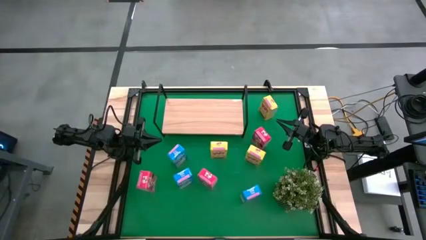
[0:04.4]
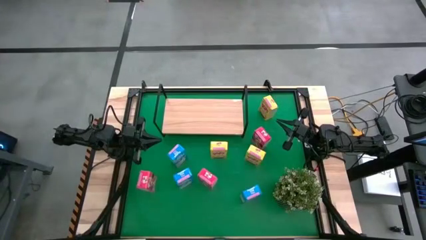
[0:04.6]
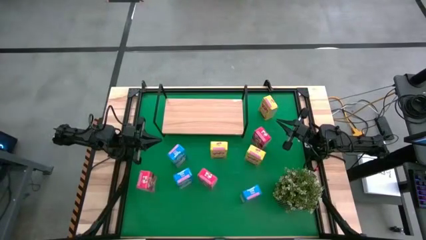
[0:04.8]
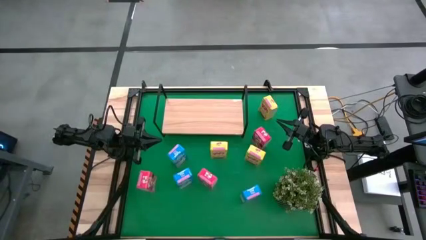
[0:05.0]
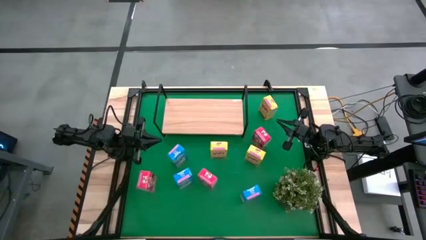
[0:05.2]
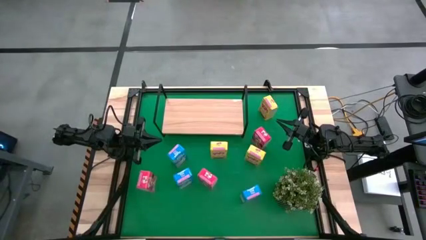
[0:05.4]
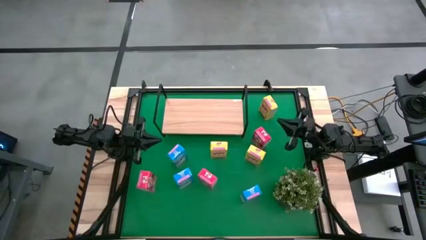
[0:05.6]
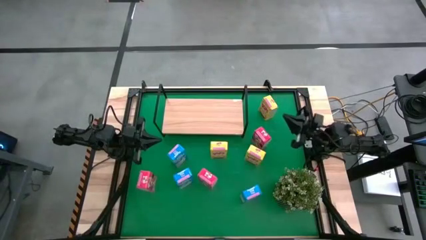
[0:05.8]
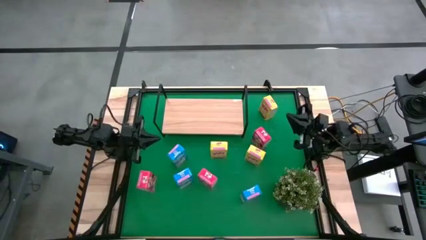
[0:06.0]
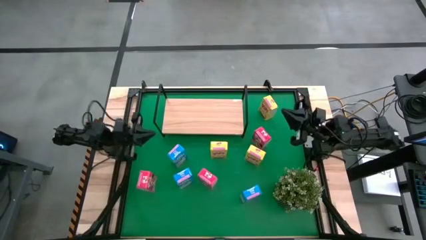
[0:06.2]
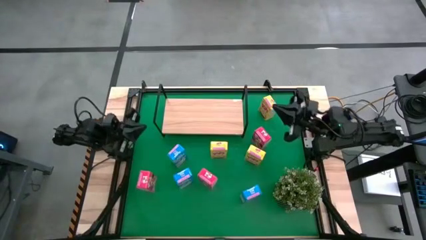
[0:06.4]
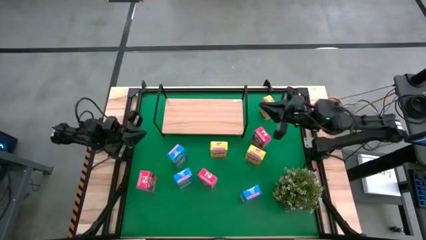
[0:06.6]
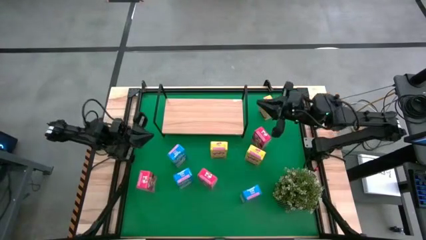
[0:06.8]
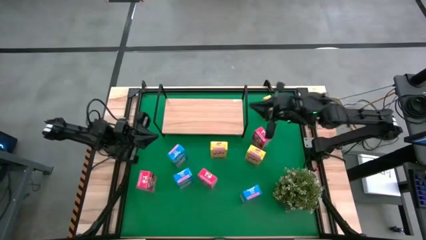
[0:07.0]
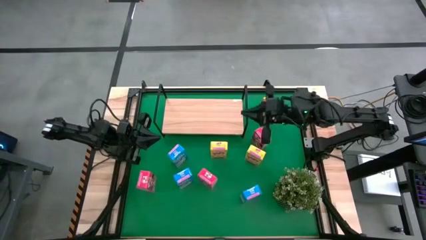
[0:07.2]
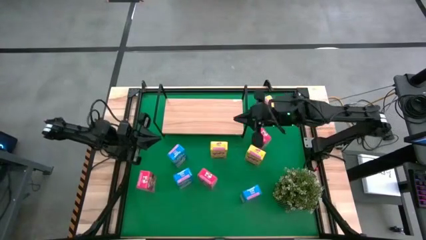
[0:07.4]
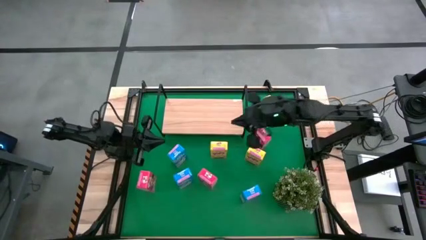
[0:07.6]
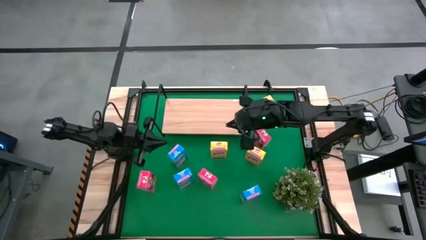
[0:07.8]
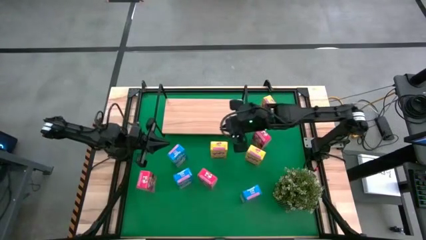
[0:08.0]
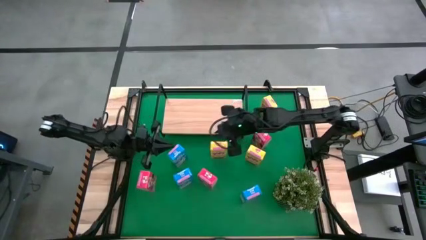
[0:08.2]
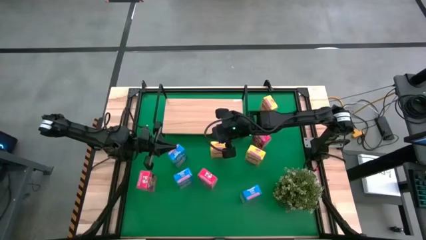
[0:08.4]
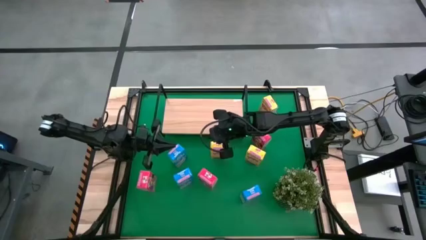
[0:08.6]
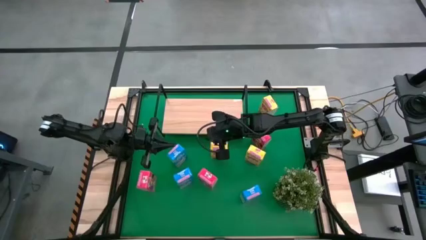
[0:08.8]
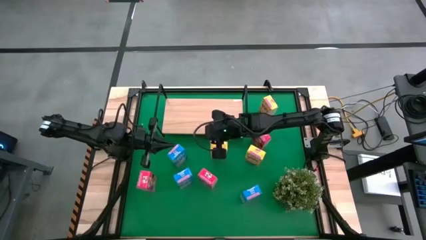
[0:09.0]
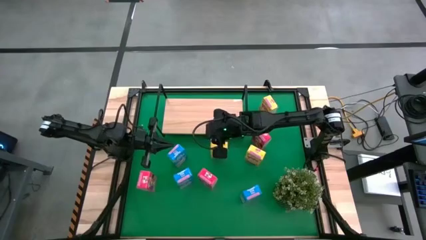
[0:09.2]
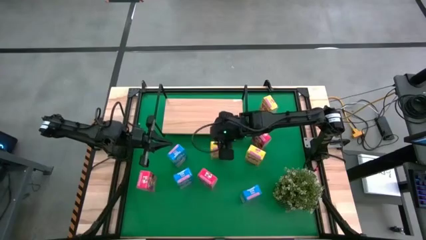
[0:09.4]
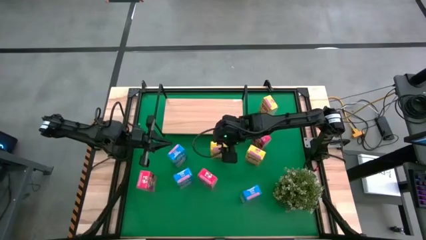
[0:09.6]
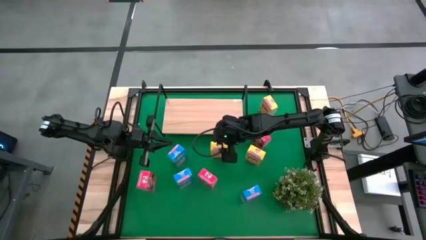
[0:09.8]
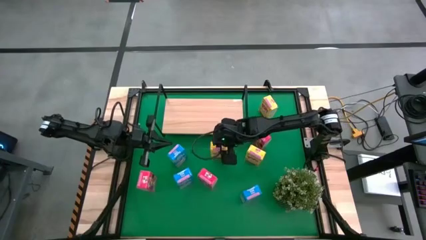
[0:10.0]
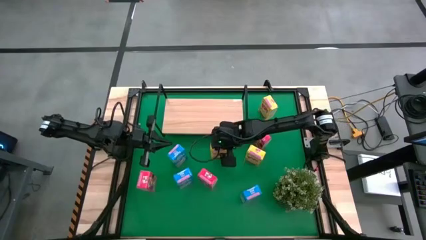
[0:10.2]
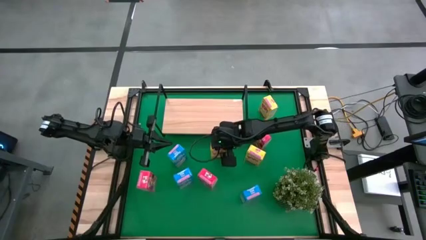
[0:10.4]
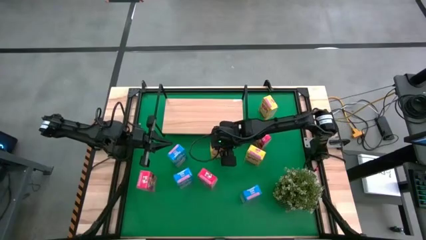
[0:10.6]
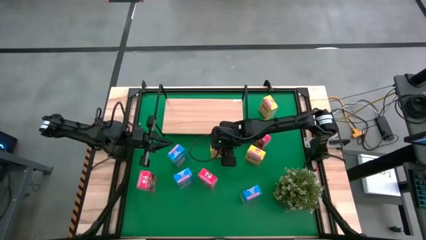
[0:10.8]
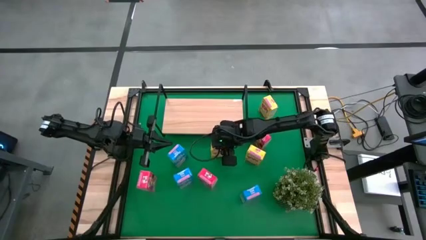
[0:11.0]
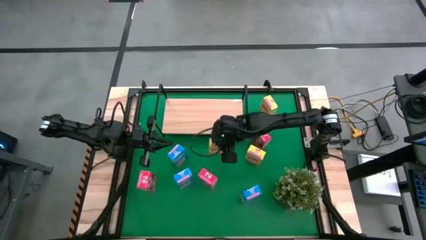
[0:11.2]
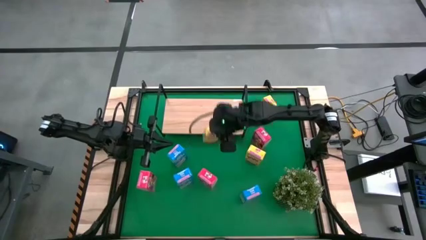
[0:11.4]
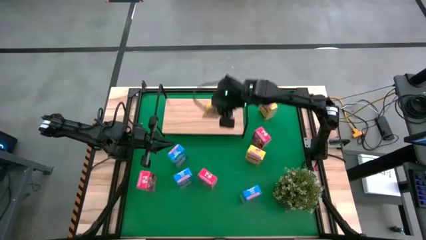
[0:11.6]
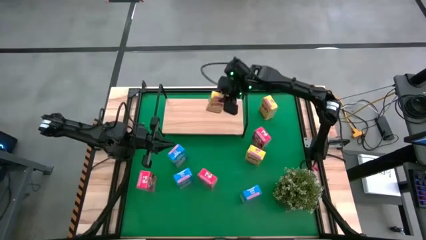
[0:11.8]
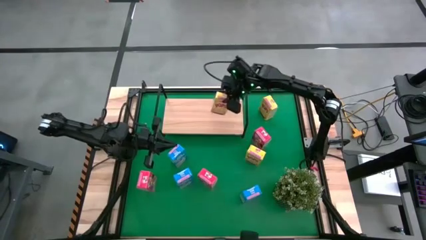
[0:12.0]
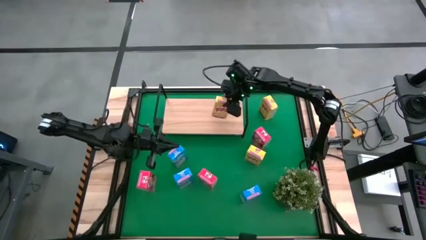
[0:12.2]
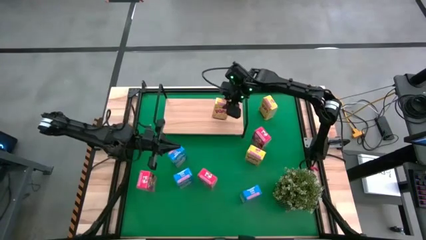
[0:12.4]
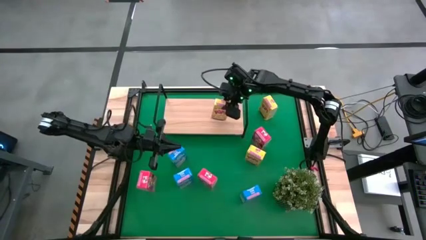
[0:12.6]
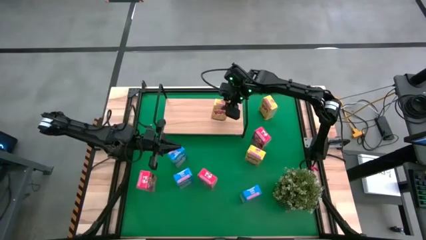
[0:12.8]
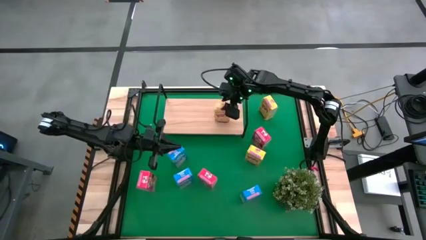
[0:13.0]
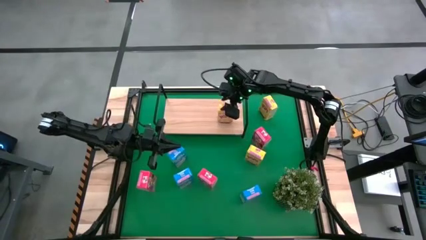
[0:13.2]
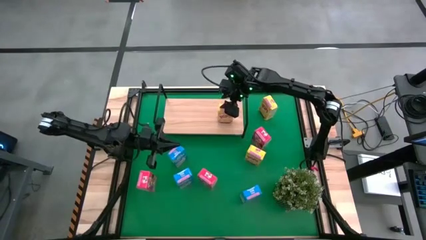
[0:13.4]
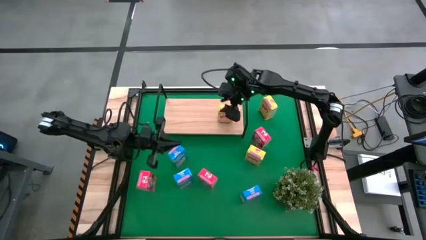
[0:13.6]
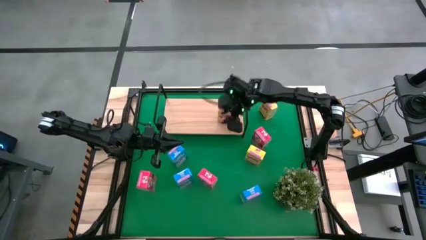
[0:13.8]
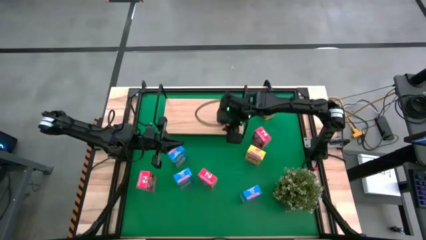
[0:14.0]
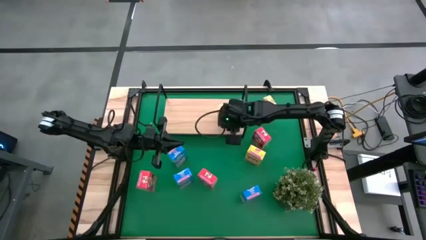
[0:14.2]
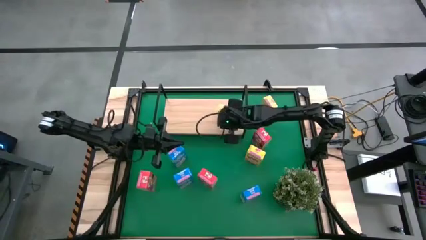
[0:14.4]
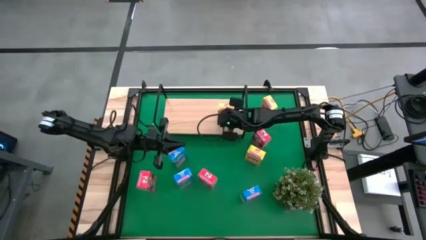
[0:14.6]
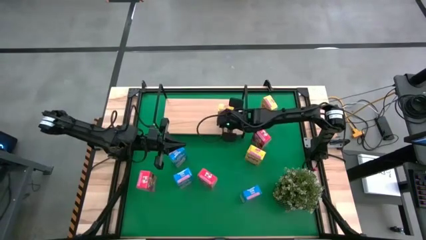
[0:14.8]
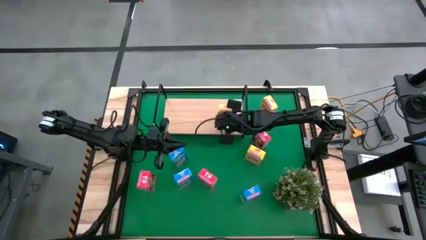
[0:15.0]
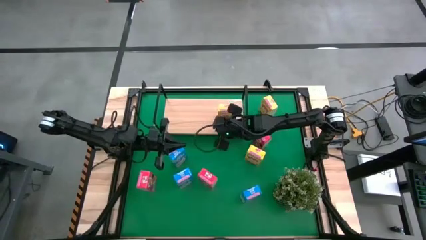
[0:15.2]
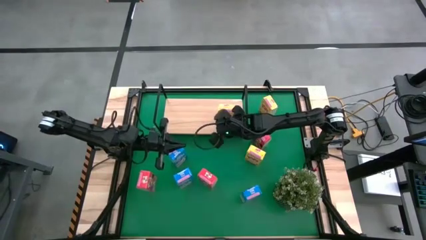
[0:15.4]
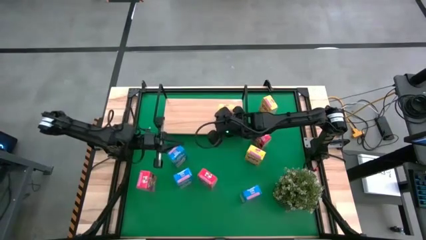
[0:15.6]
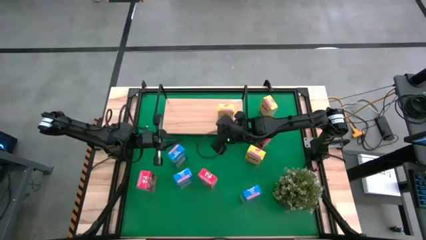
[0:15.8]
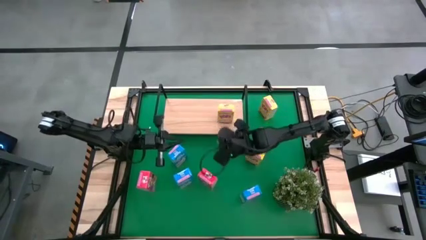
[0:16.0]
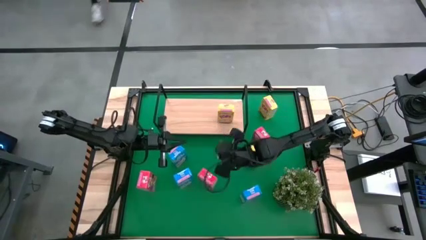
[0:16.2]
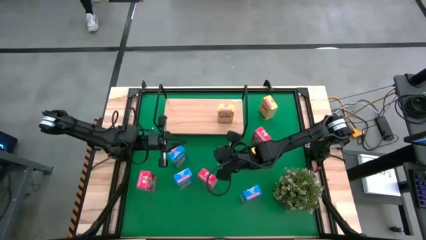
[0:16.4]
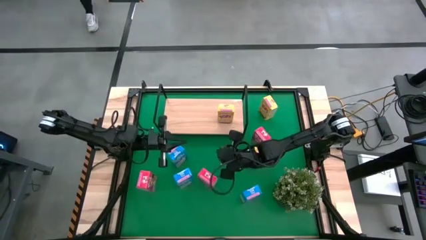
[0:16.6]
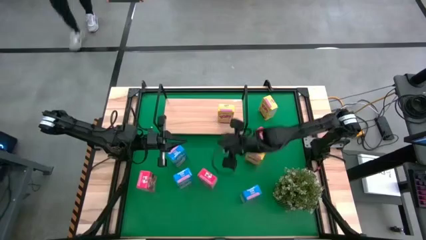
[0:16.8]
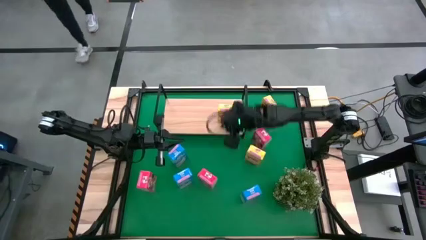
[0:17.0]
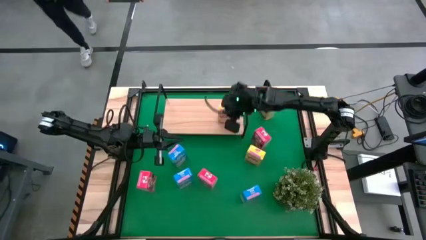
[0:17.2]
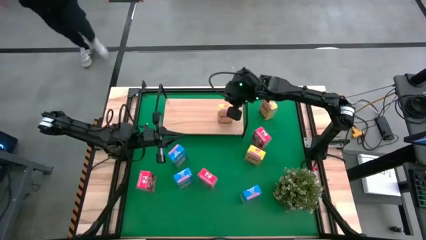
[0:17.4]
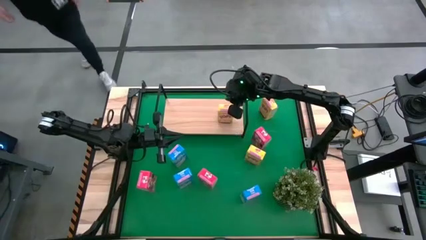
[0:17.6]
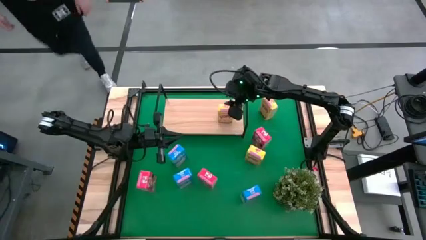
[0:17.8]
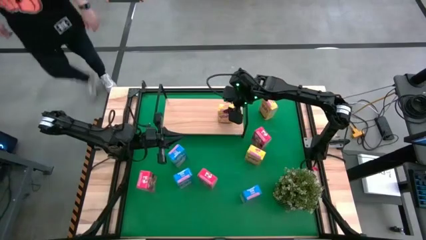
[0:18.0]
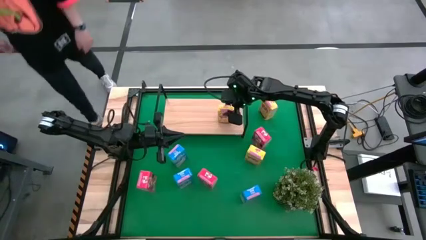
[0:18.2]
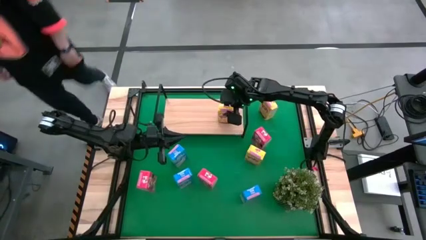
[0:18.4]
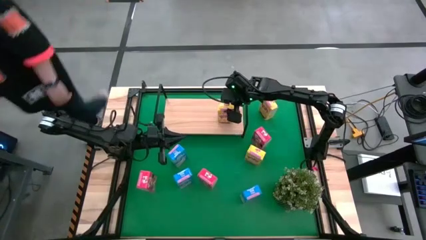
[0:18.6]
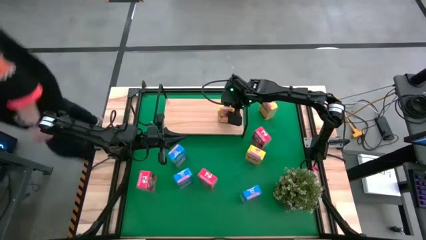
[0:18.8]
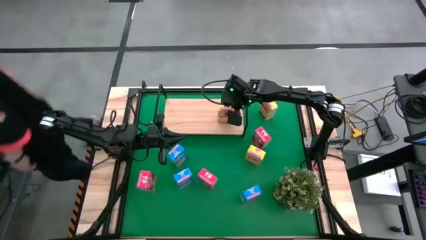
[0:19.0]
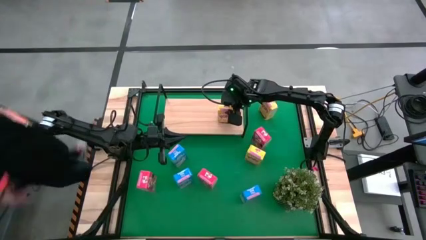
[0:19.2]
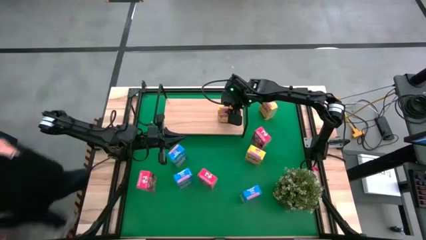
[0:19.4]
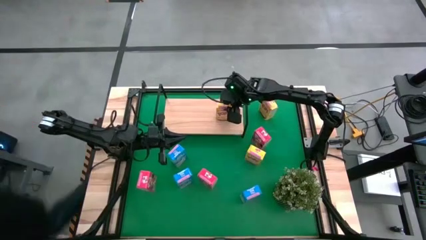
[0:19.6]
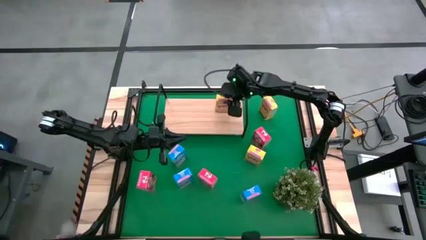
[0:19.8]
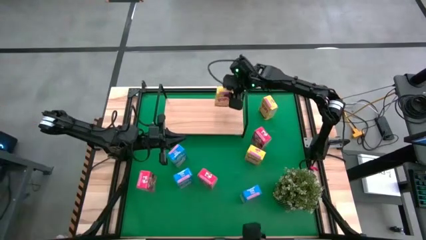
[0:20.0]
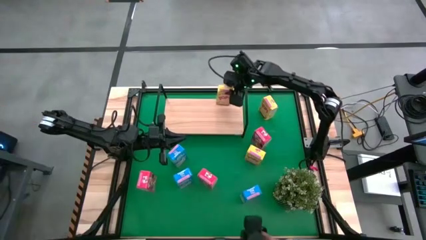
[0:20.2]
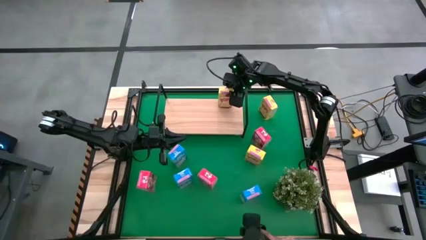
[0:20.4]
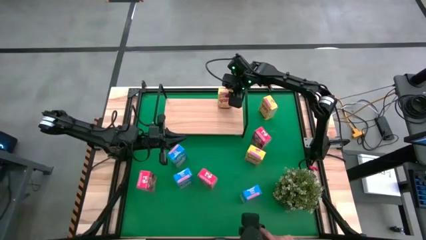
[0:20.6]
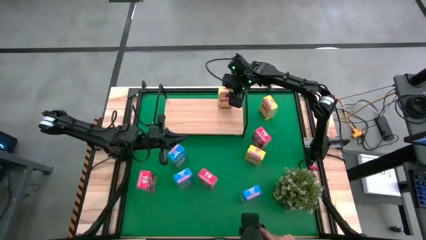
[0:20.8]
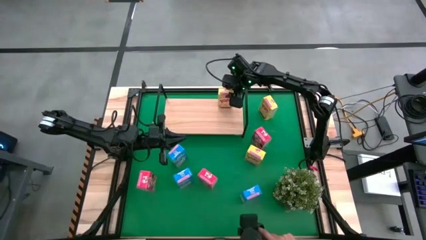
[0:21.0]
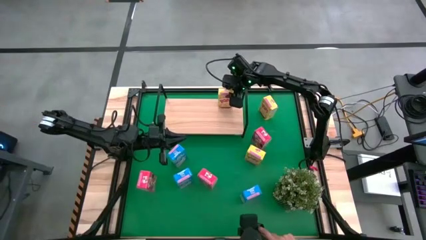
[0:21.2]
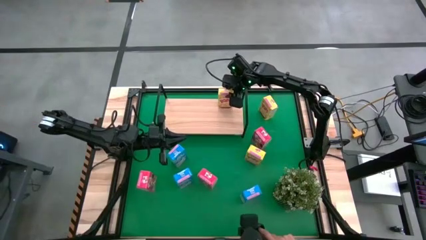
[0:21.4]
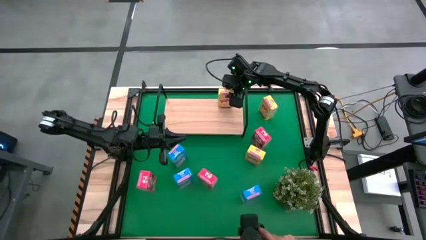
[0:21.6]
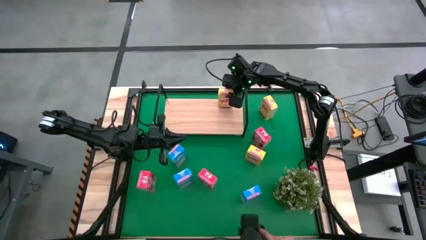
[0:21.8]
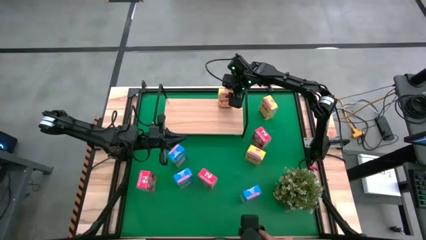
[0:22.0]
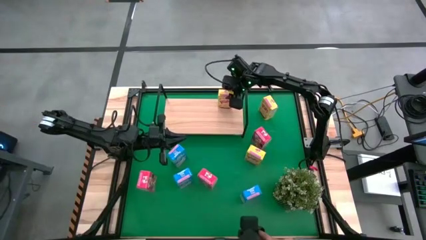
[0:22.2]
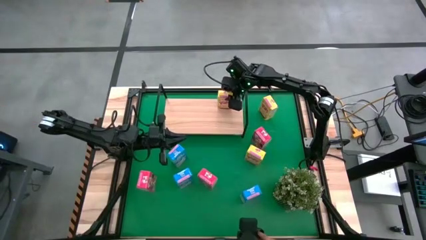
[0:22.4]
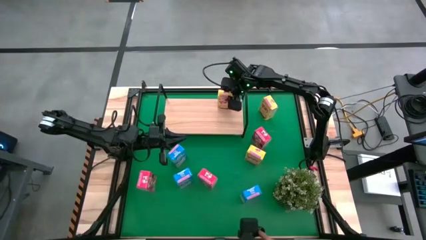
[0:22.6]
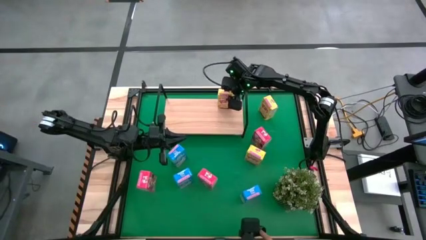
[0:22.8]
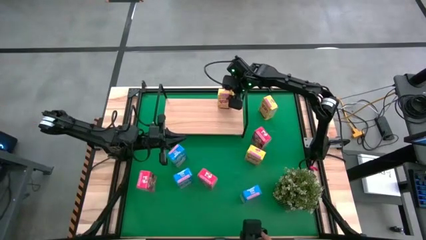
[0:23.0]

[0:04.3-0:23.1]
Task: Stack cereal on shelf
Put the bottom left yellow cereal box on the shelf
